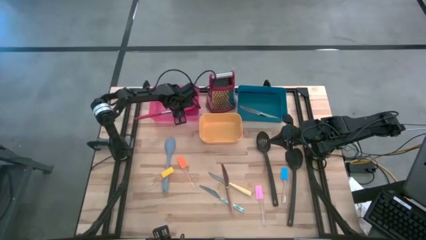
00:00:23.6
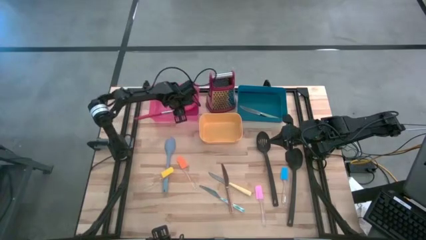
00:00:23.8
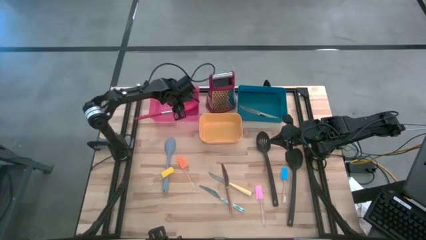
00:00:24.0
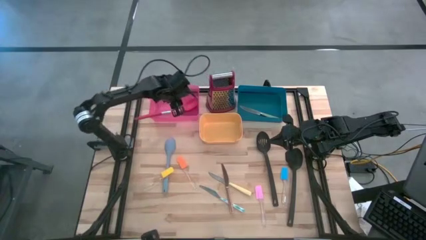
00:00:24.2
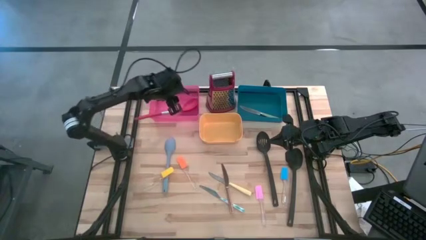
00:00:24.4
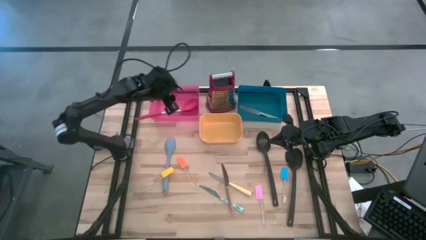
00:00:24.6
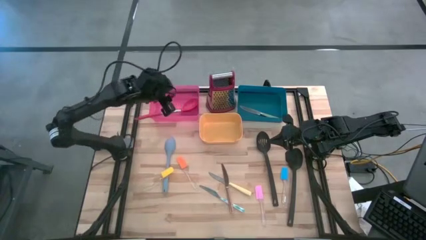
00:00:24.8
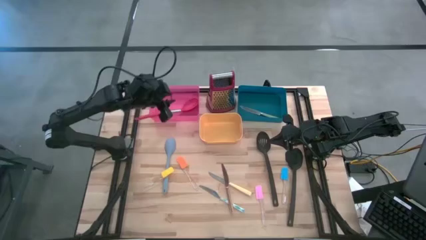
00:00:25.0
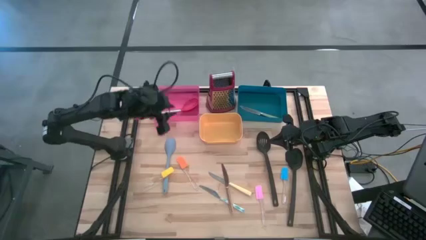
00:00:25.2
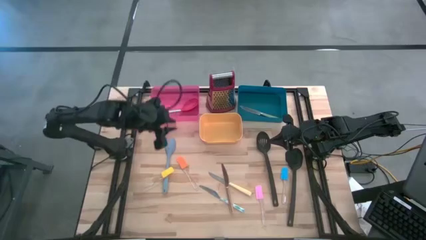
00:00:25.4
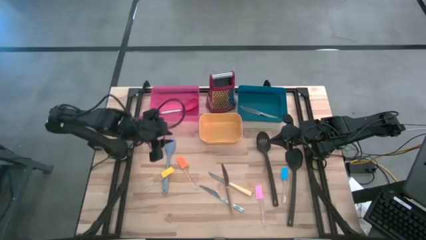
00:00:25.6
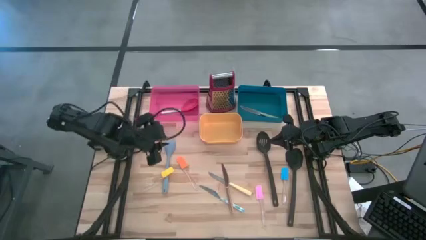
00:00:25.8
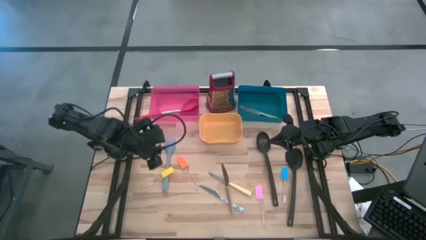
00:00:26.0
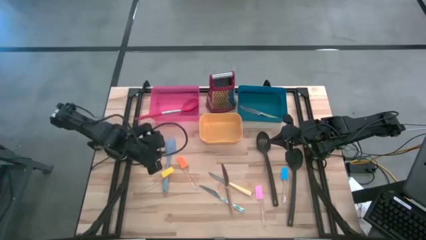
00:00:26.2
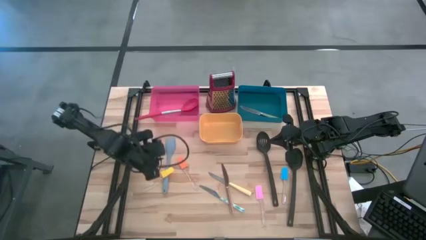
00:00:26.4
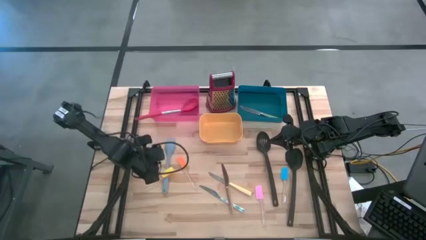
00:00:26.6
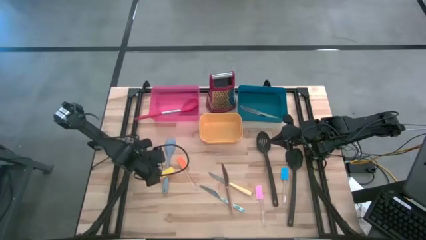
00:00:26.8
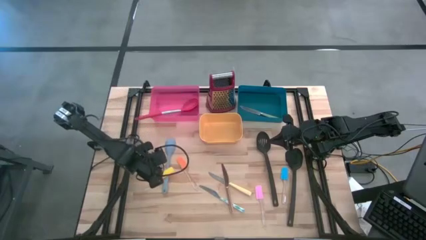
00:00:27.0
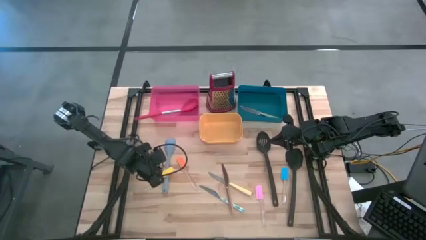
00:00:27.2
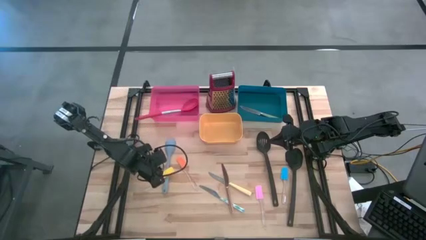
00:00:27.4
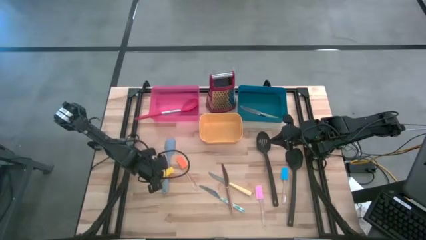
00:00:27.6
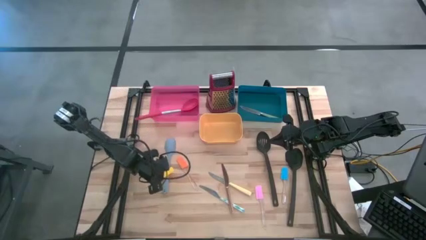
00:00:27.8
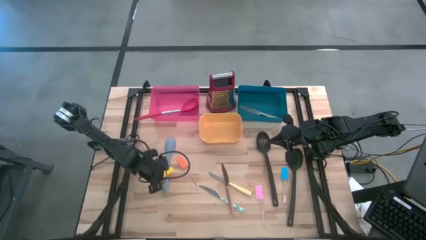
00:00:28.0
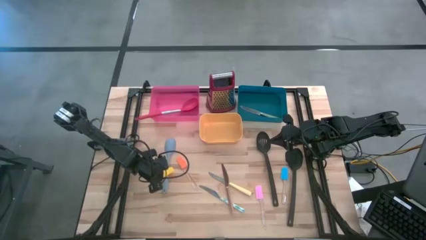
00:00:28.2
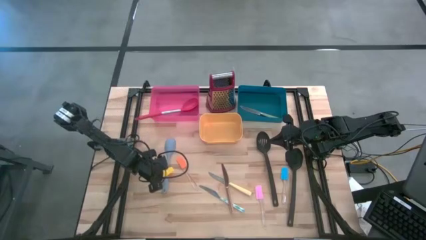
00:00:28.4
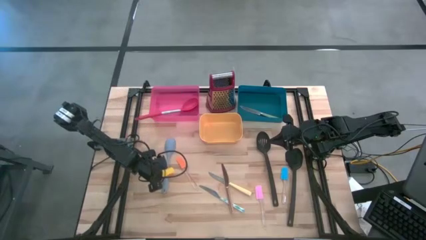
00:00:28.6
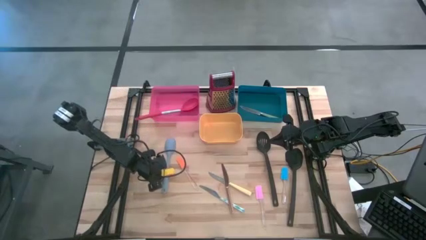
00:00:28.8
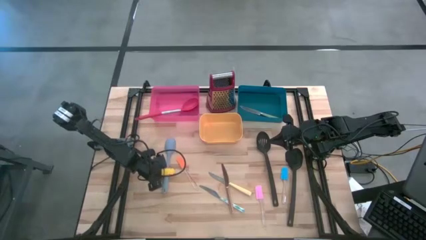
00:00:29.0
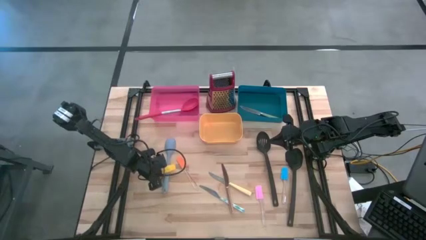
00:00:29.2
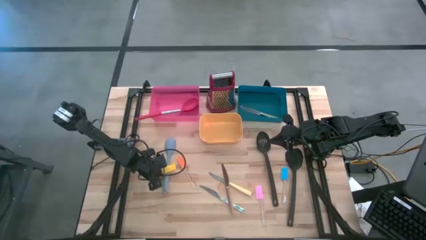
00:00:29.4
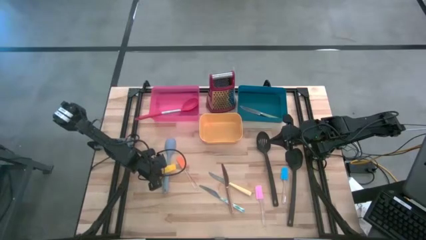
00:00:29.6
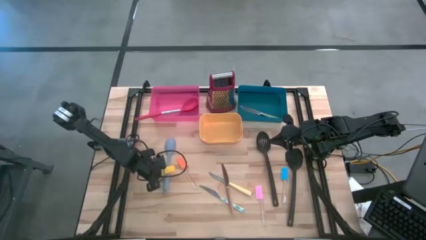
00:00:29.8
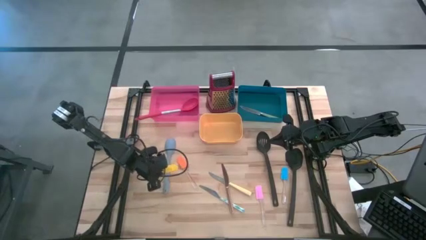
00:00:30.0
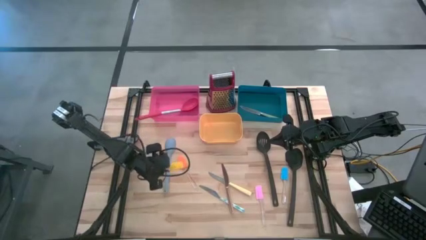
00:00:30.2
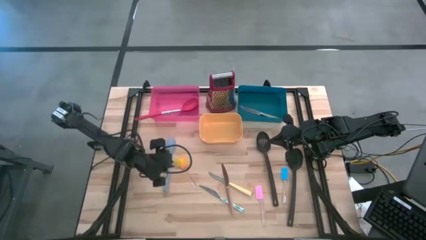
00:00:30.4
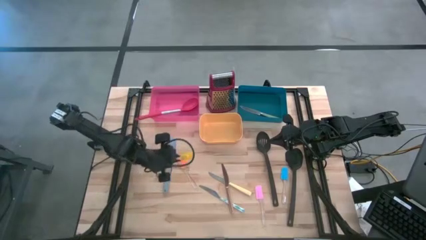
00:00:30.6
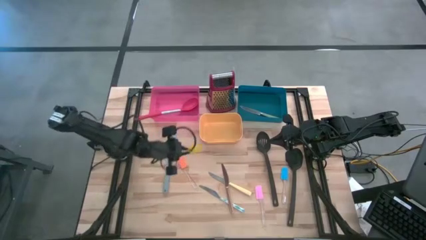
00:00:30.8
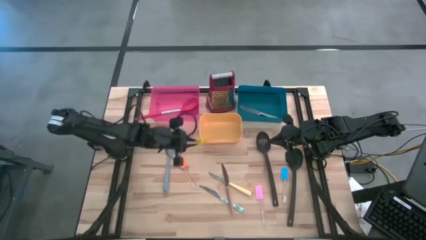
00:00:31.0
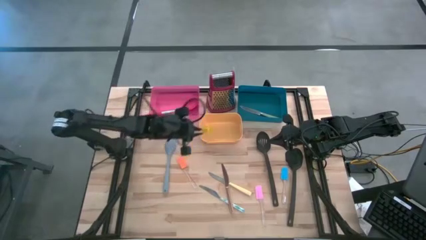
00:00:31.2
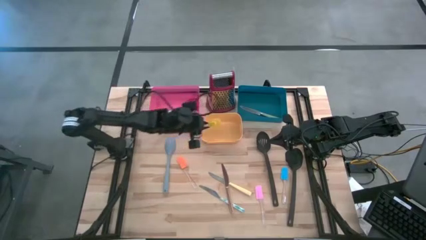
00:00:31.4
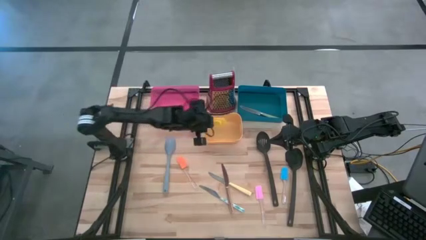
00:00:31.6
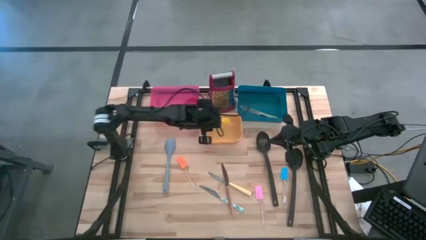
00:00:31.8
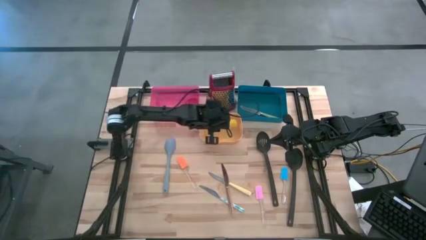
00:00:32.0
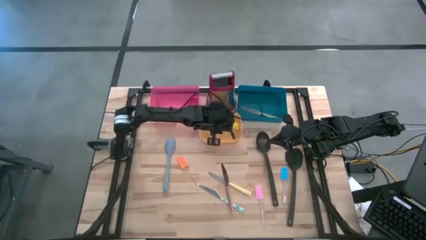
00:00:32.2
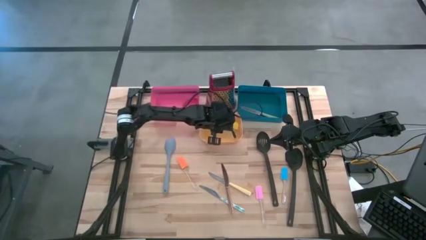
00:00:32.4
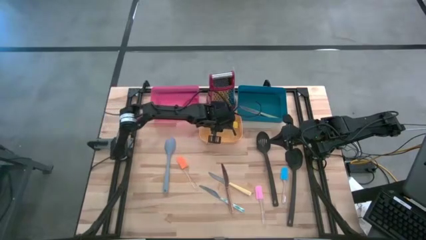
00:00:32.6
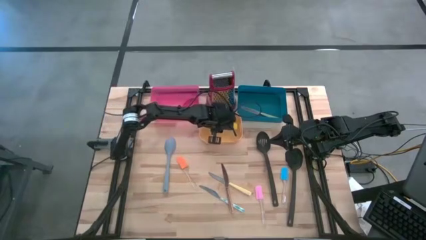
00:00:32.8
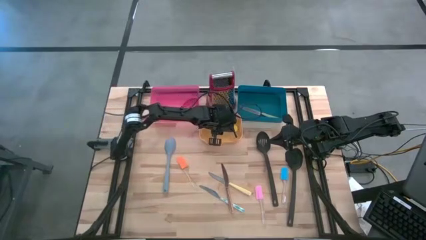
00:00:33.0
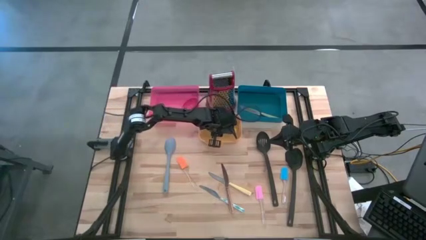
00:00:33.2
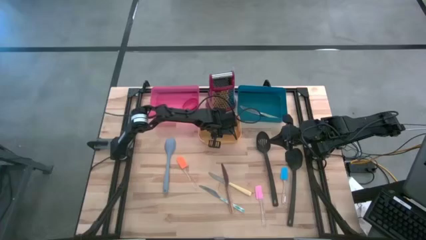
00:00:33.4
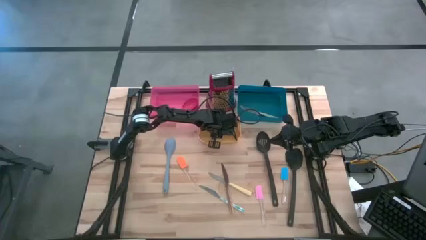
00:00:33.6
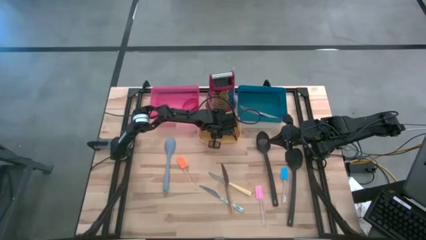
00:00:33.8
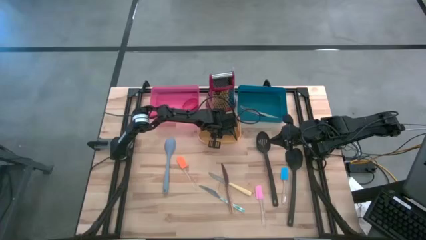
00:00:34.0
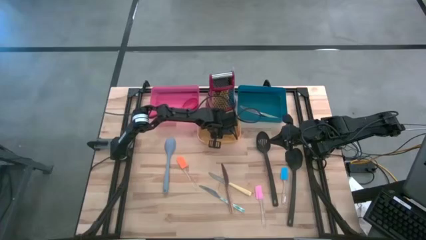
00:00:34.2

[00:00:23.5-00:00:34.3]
Task: Pick & Place Kitchen Items
Put the yellow spatula into the yellow bin

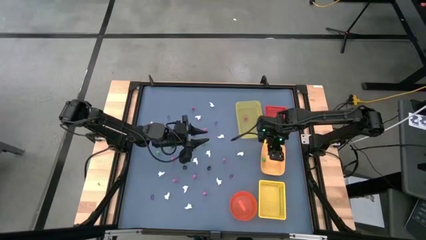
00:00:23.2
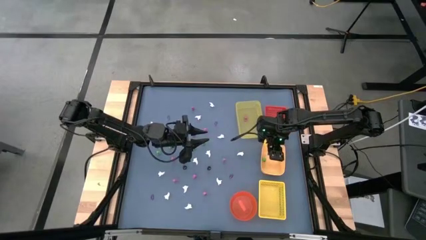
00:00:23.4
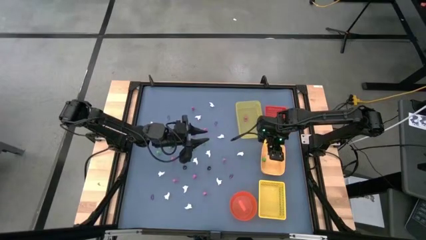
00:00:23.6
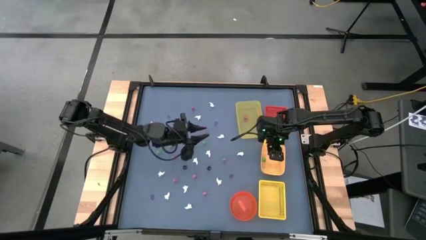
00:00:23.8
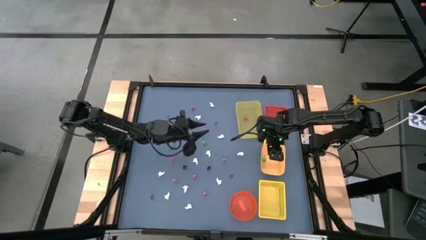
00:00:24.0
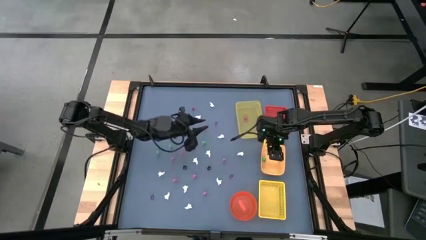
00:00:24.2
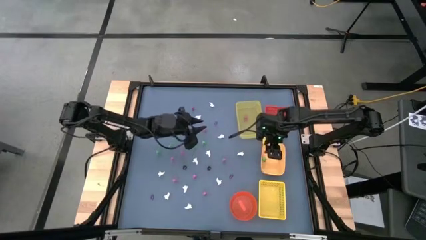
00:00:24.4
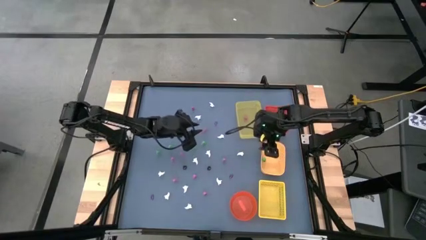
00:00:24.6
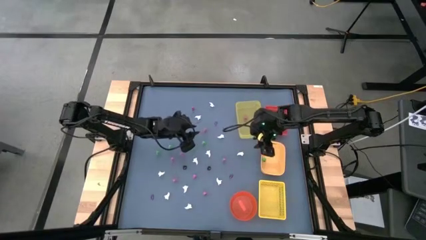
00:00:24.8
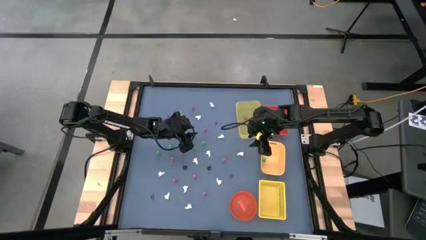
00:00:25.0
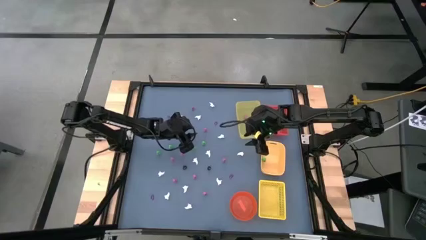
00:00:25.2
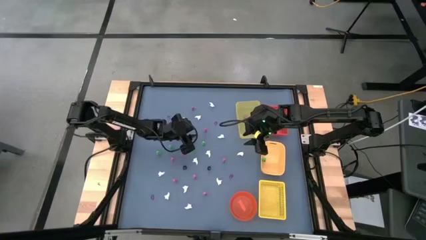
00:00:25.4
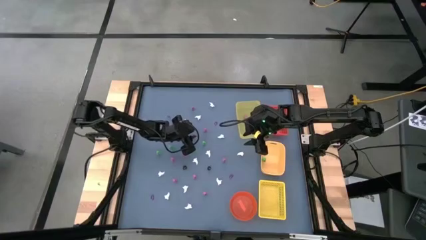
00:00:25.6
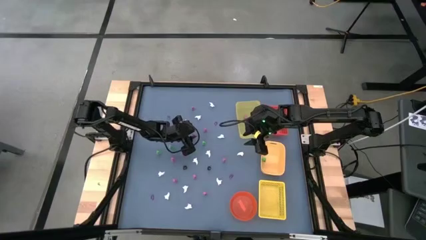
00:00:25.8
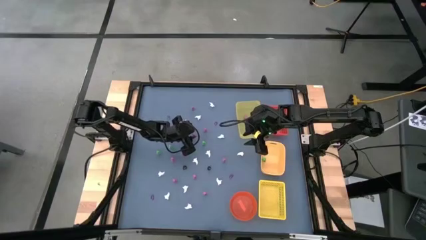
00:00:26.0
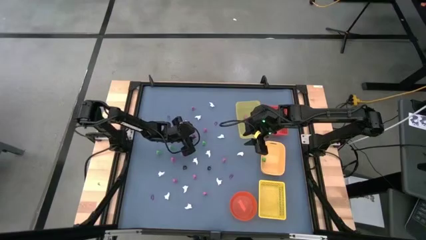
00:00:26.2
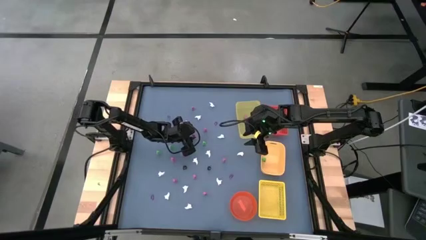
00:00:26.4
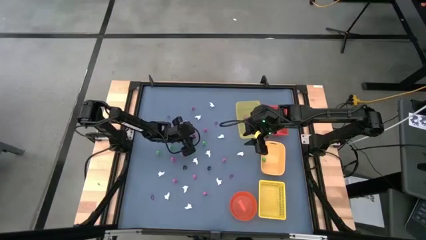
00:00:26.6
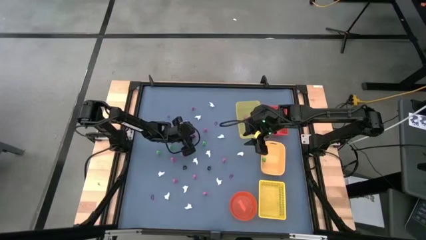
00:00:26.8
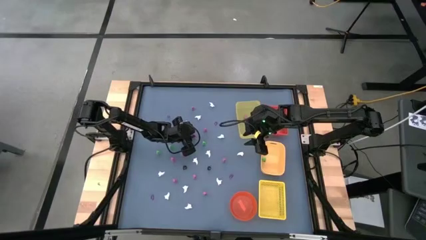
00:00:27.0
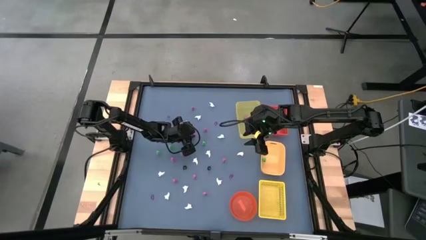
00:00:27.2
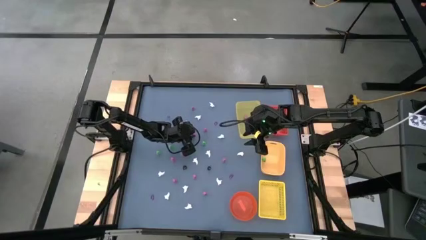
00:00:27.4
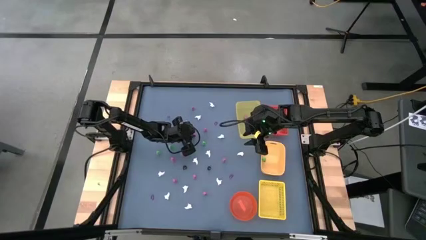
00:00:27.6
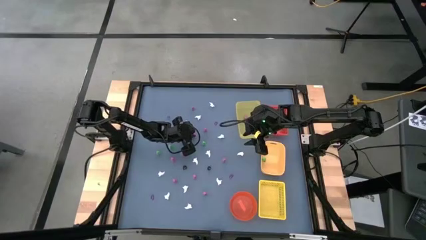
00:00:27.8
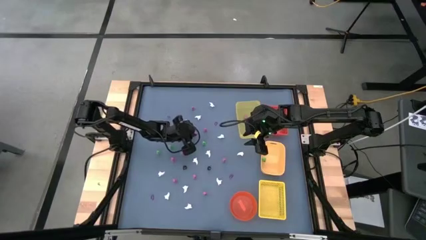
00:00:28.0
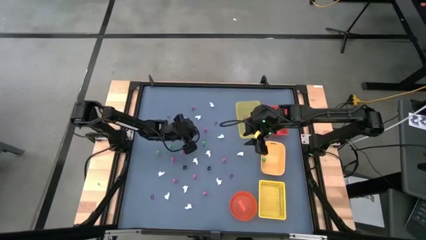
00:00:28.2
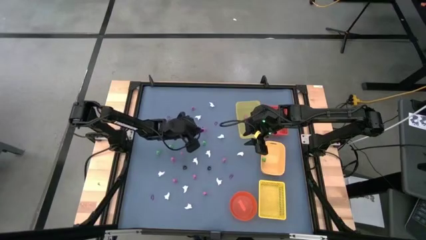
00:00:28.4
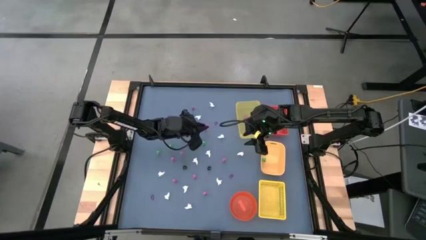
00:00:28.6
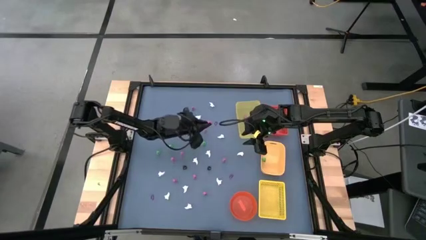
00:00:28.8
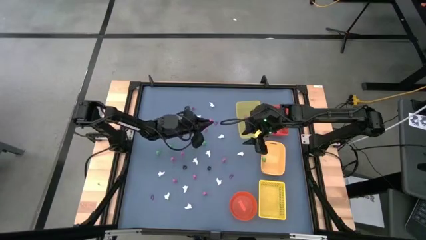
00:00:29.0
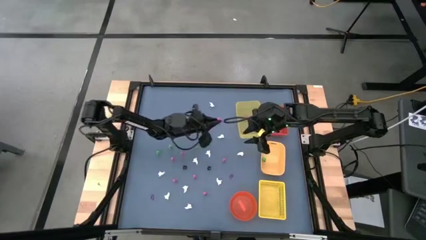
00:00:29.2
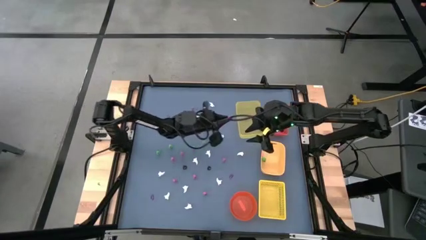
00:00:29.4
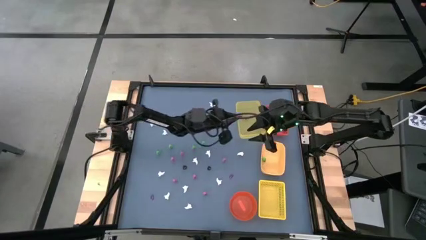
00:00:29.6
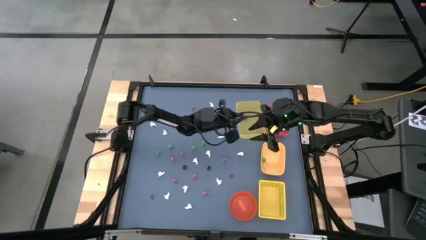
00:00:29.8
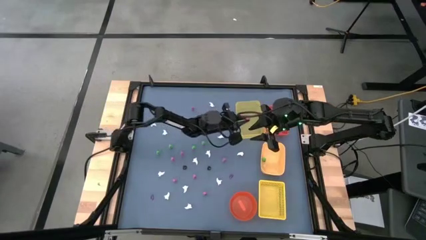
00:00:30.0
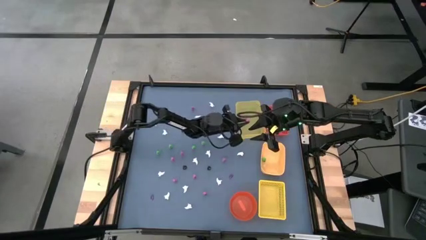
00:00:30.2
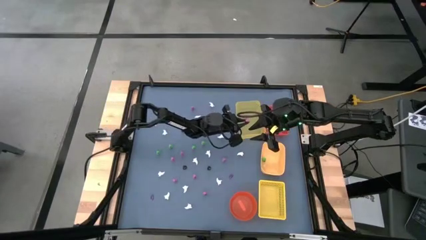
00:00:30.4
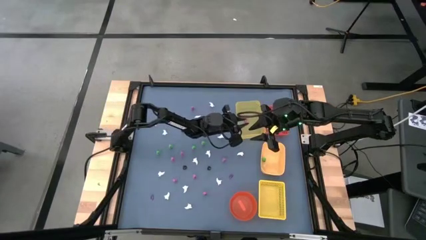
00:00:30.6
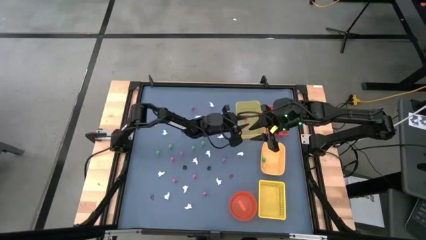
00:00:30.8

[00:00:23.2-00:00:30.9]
Task: Sort Halloween decoration
Put the pink skeleton toy into the top yellow bin
